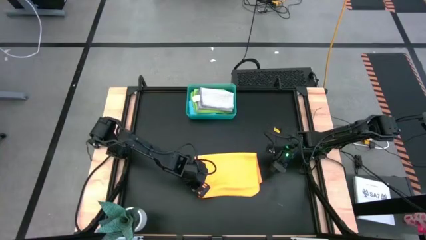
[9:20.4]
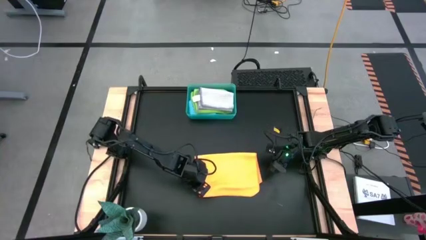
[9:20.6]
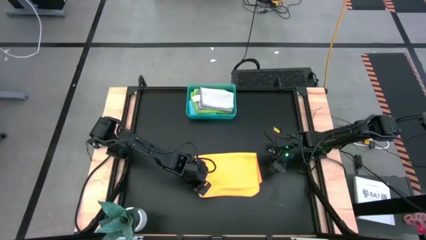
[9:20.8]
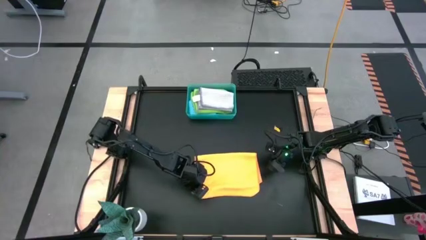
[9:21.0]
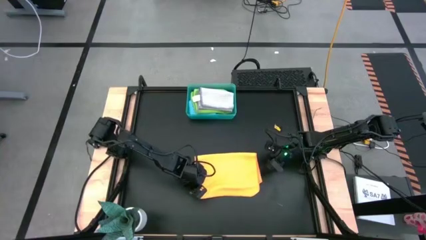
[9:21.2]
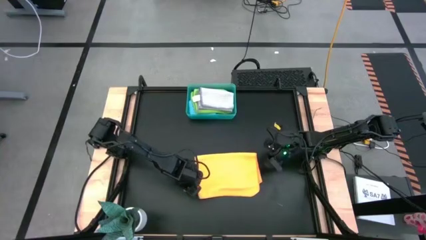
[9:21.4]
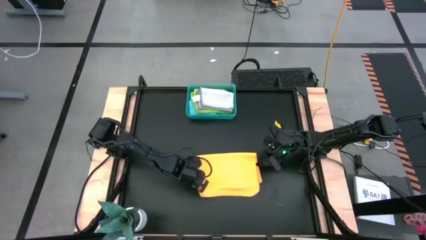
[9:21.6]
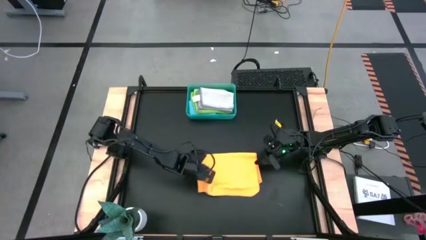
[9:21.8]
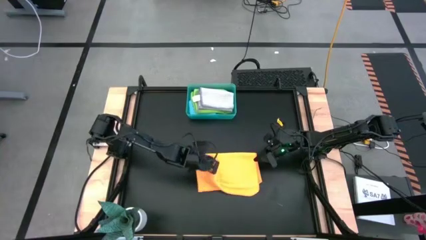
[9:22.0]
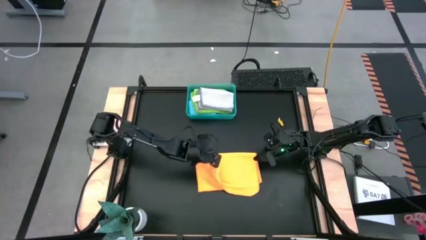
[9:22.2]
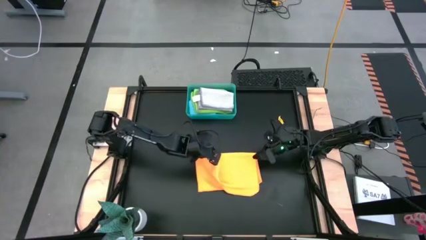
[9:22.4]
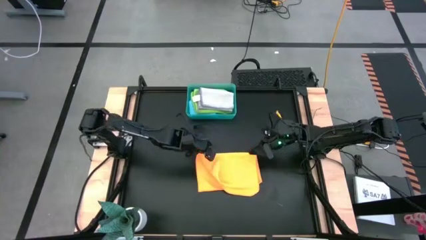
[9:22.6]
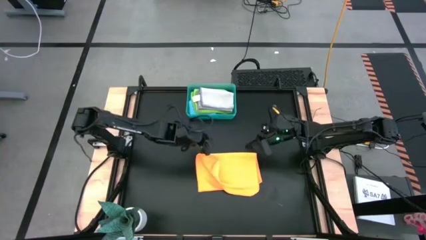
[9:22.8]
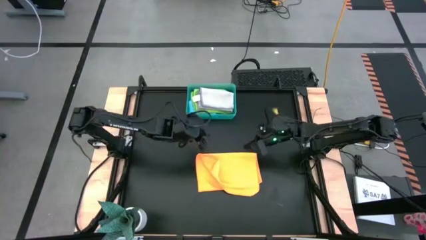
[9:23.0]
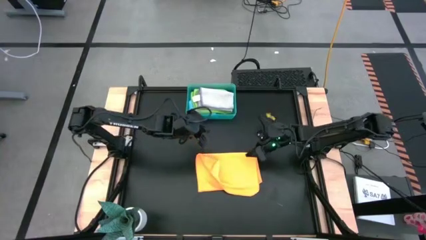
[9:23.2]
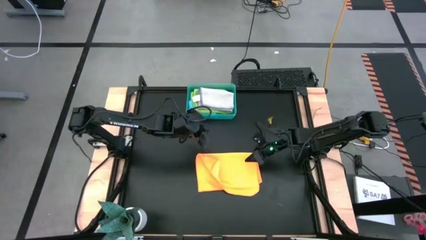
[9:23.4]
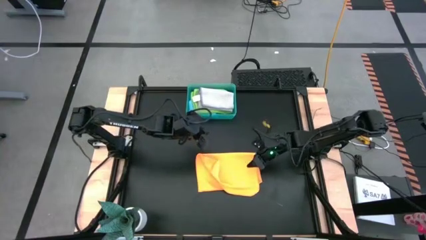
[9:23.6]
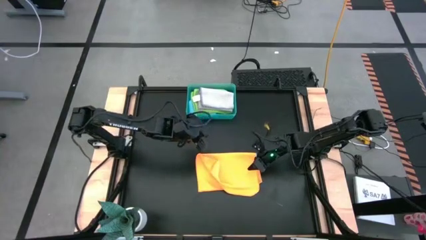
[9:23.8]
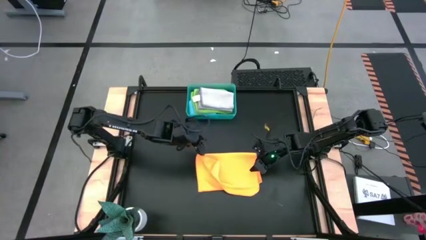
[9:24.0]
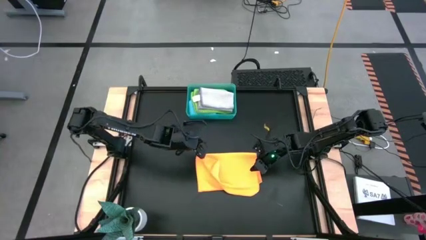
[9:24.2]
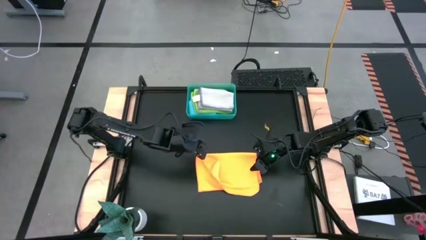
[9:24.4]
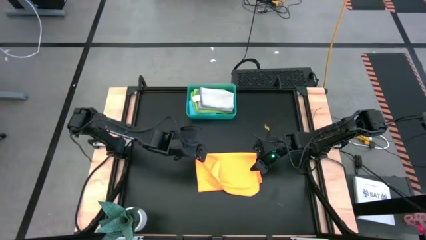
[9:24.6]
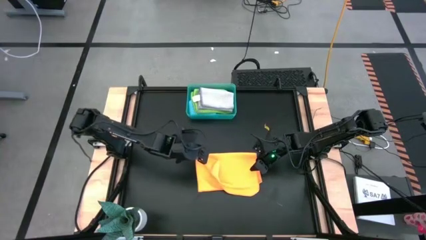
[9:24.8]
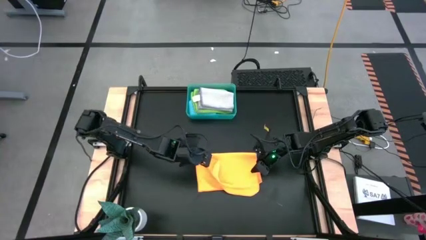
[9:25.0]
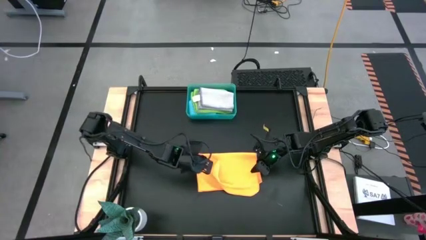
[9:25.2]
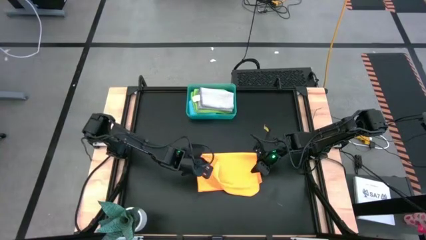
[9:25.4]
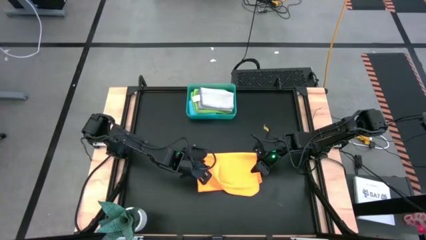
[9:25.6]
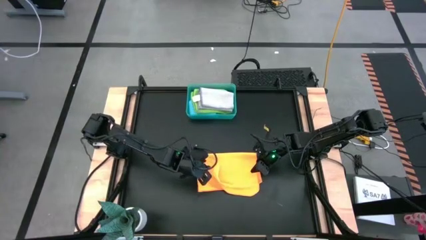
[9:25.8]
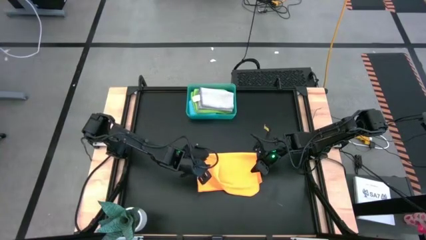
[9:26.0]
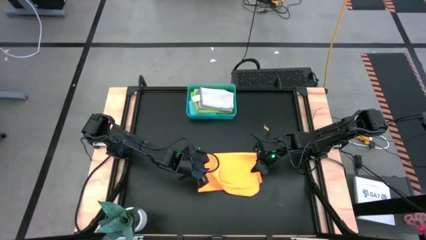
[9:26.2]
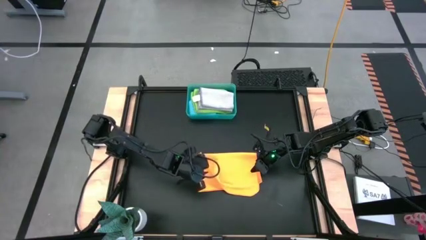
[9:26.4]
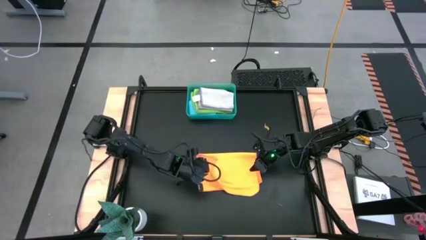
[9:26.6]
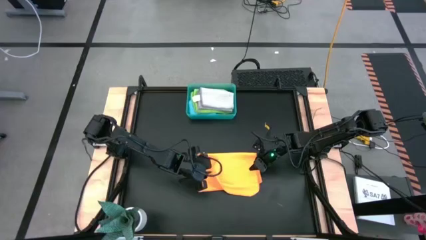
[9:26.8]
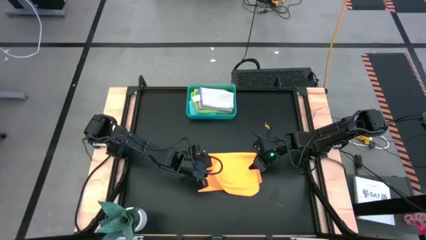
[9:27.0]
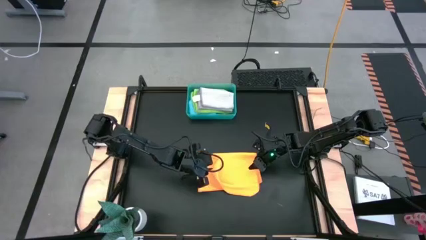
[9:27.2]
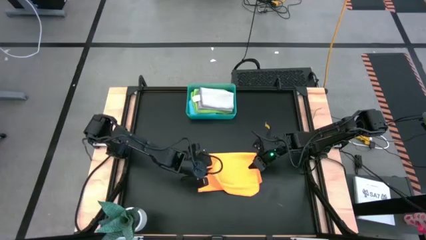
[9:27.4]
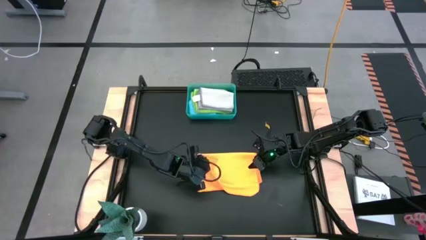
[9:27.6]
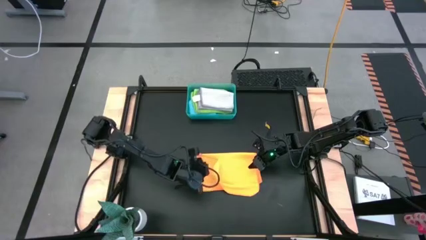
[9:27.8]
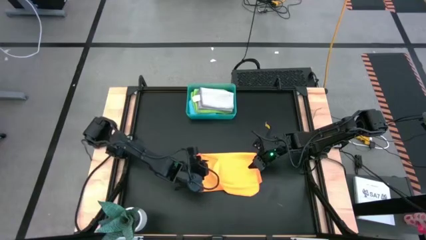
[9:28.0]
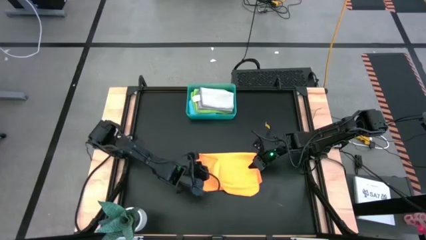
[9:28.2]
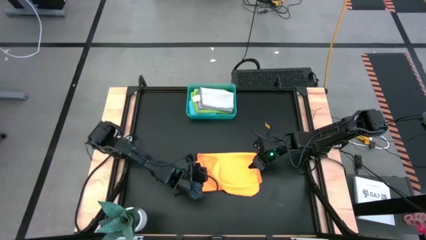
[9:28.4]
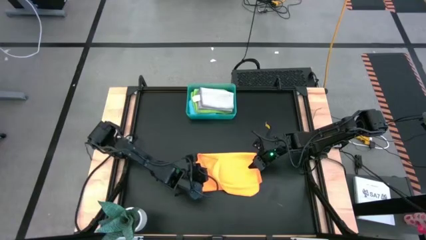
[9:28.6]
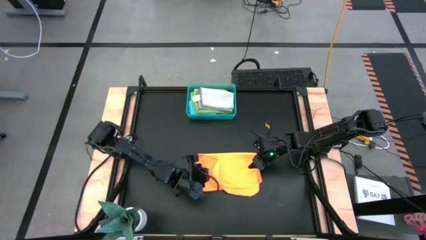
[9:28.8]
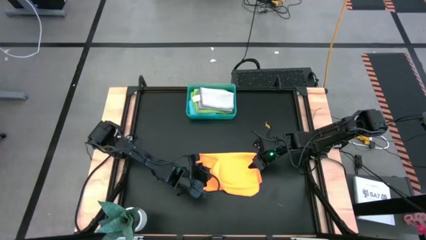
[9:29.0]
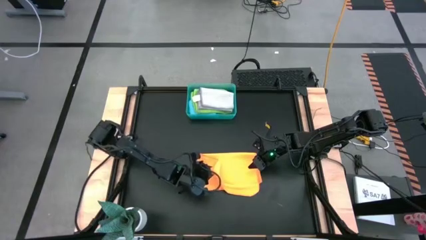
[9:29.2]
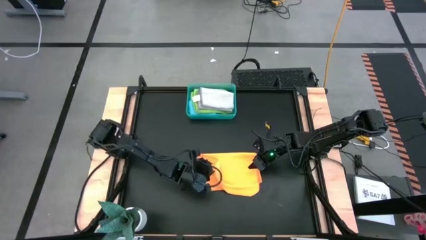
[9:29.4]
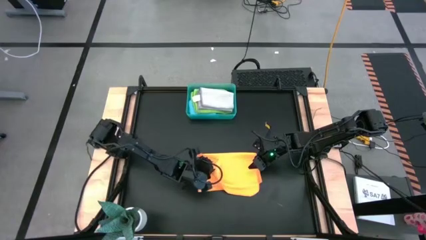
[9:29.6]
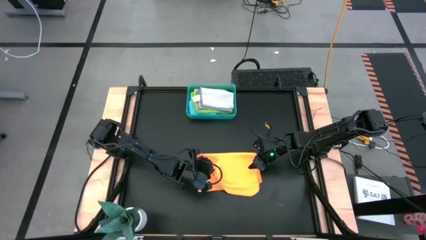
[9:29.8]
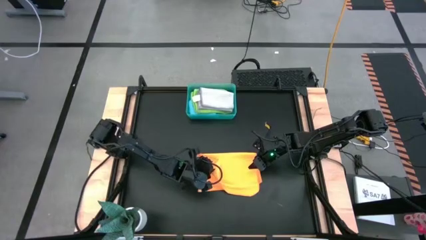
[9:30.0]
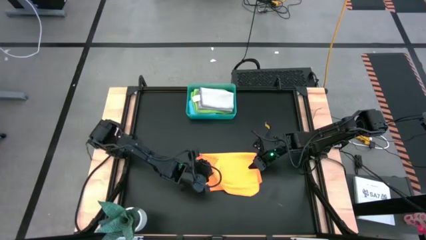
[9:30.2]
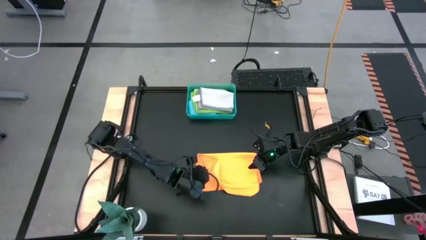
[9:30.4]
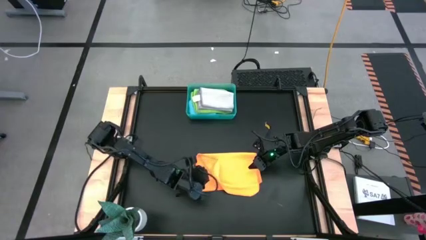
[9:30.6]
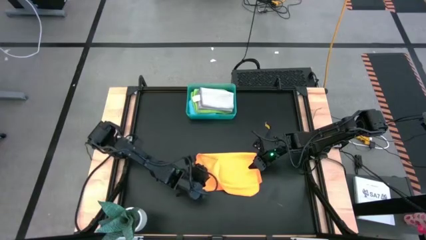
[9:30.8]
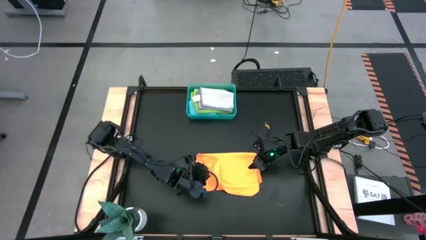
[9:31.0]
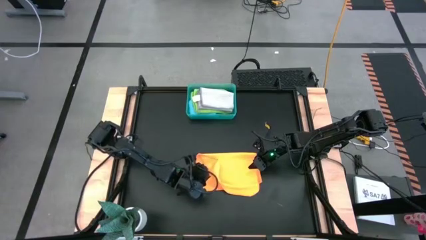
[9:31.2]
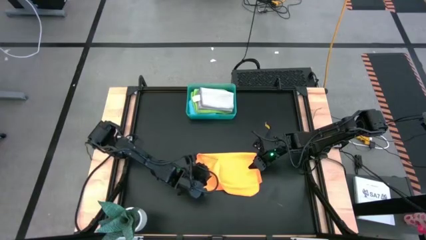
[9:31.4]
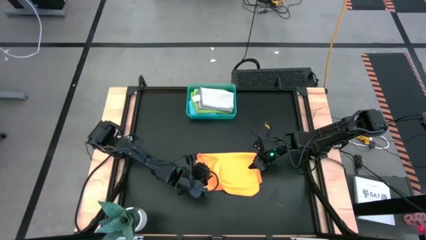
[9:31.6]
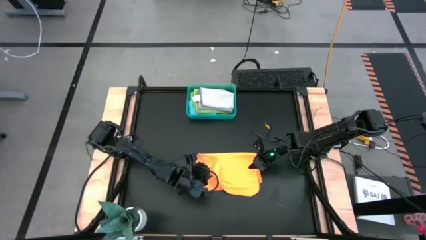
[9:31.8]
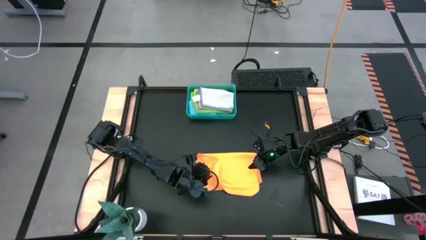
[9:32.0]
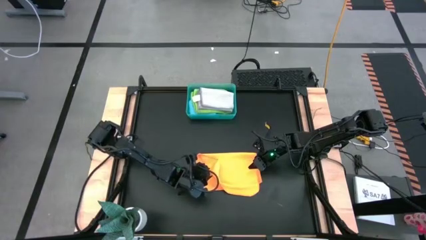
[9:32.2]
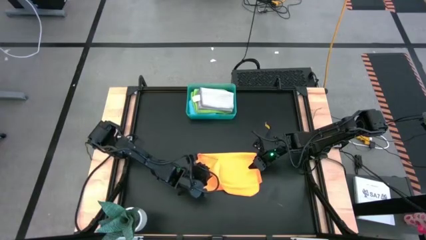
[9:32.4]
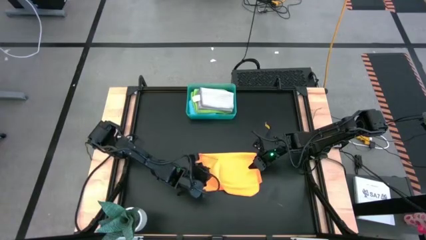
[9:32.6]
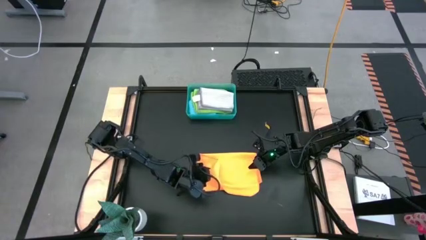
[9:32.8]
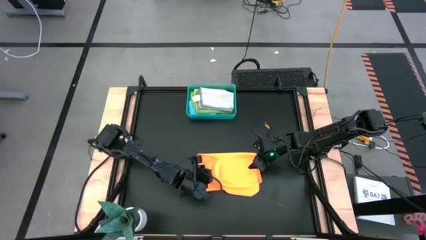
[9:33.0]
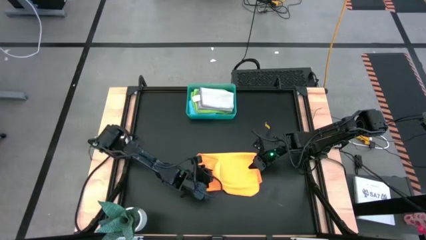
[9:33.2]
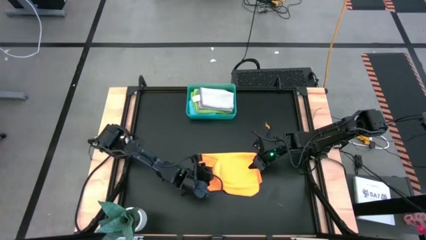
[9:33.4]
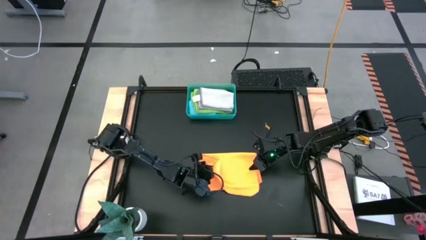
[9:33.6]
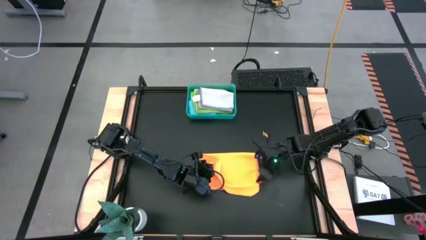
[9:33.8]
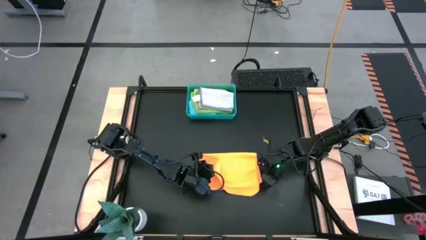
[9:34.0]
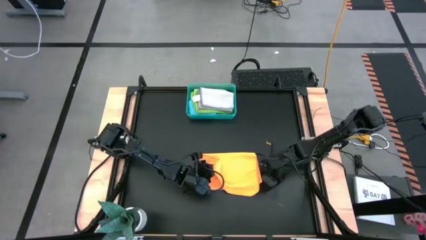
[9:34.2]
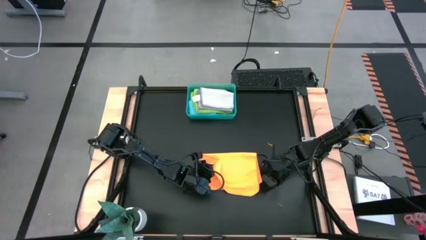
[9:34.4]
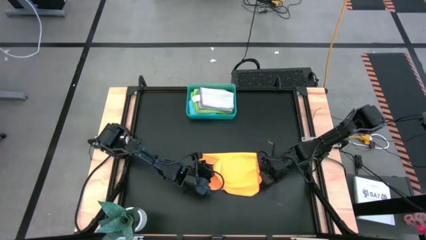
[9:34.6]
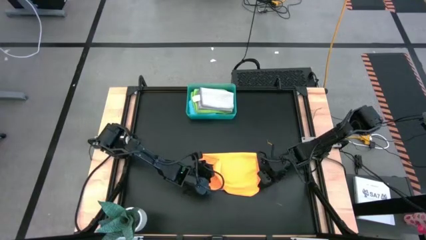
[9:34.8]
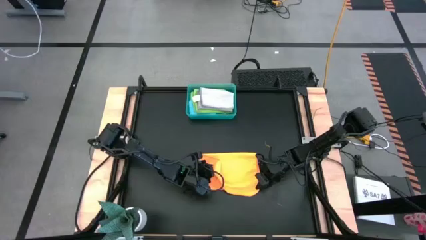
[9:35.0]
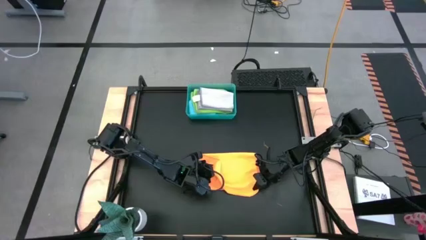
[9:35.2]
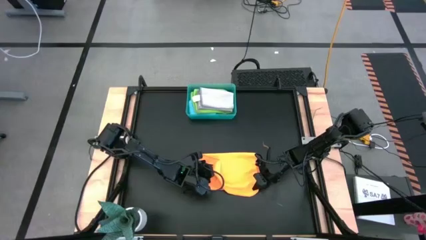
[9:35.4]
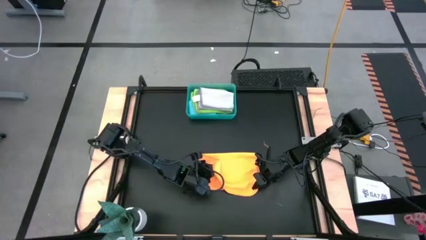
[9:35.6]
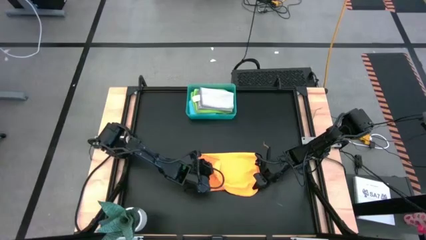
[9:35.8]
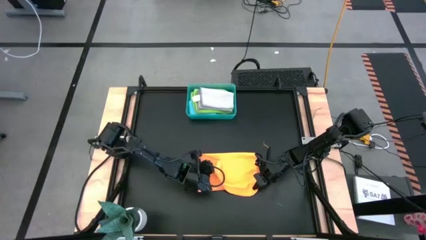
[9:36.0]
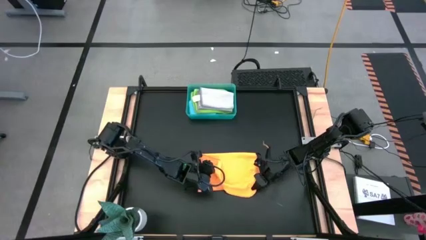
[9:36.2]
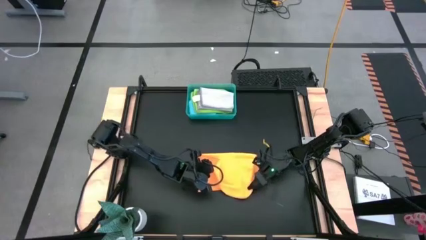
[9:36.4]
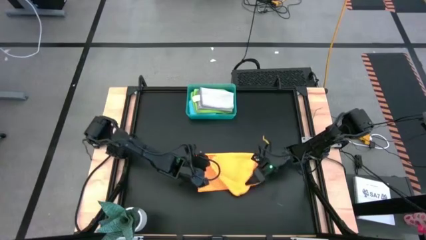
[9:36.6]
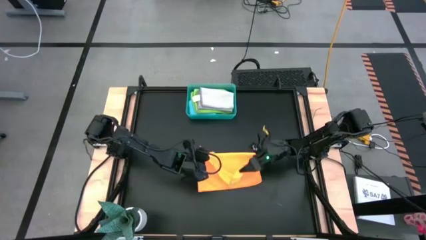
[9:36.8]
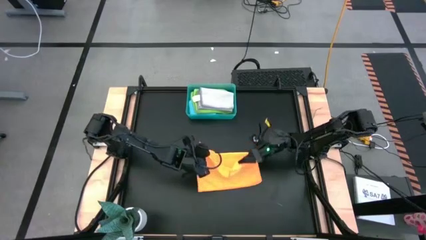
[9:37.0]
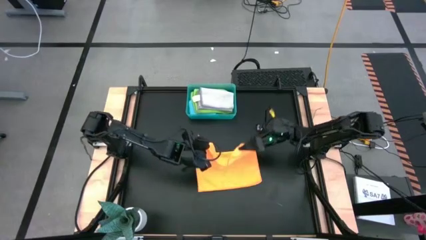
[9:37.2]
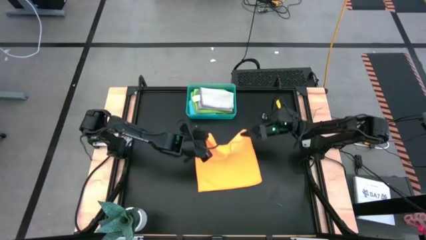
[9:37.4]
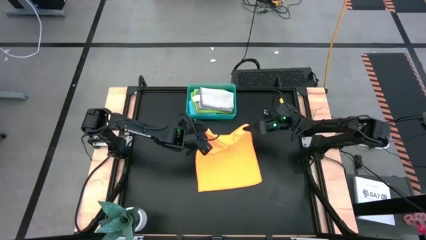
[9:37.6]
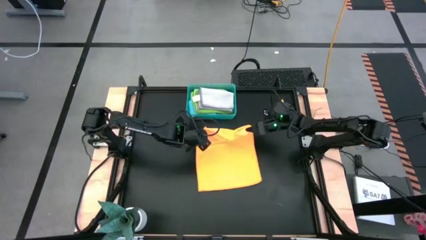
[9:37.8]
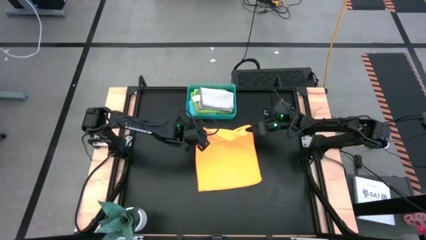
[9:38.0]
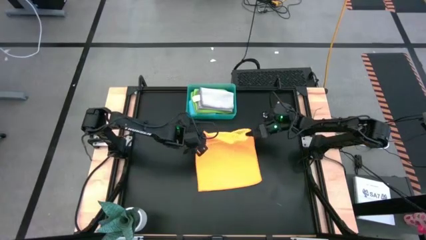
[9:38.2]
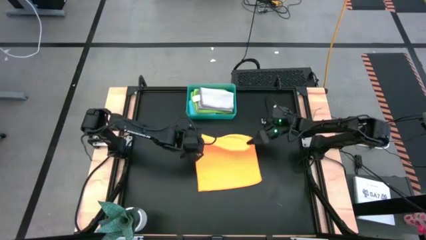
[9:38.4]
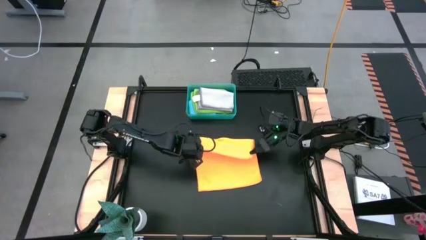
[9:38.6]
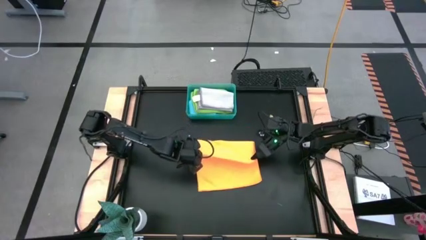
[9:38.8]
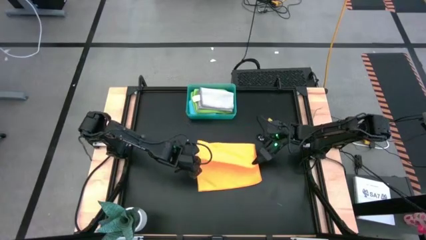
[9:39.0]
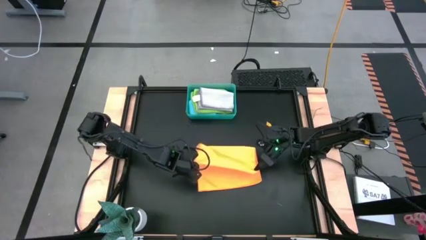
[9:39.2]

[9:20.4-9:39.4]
Task: Fold microfiber towels
Fold the orange microfiber towel
